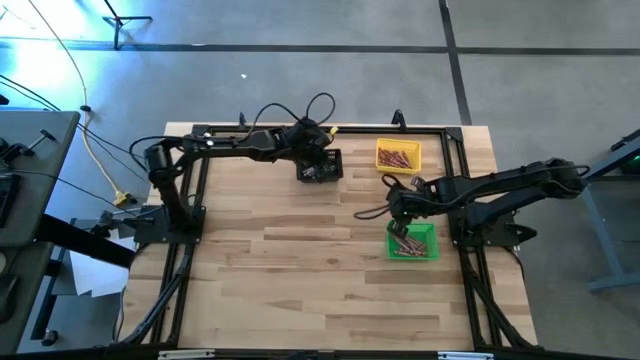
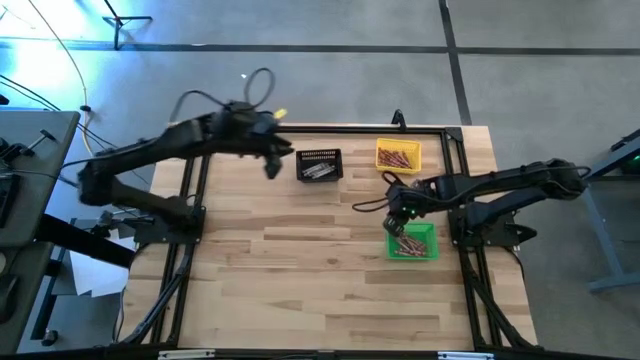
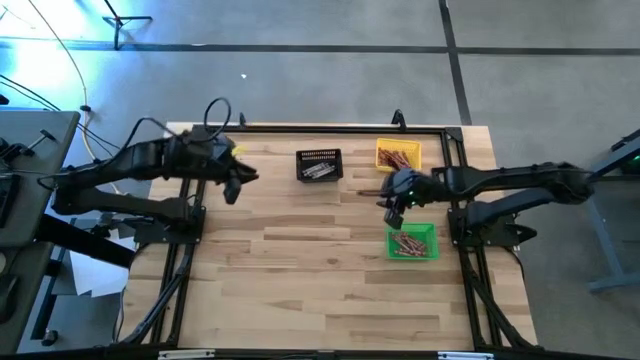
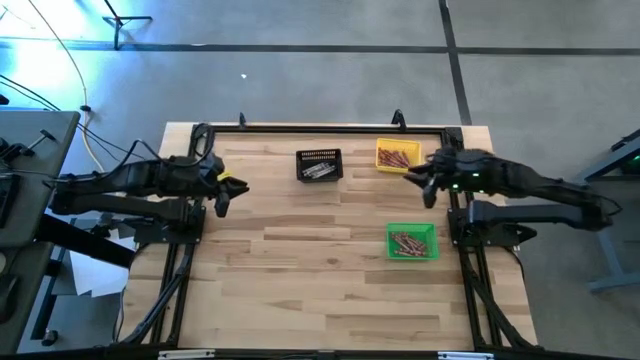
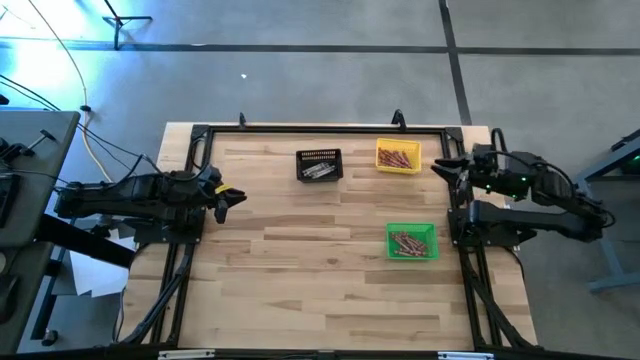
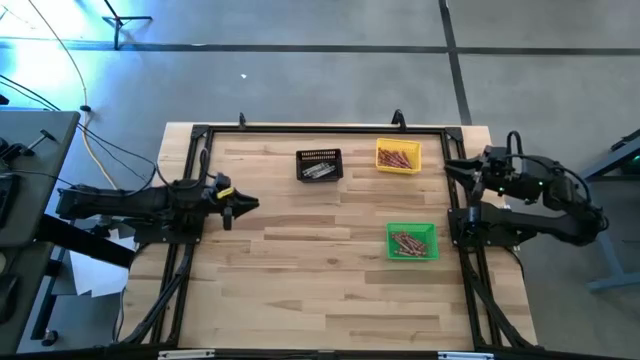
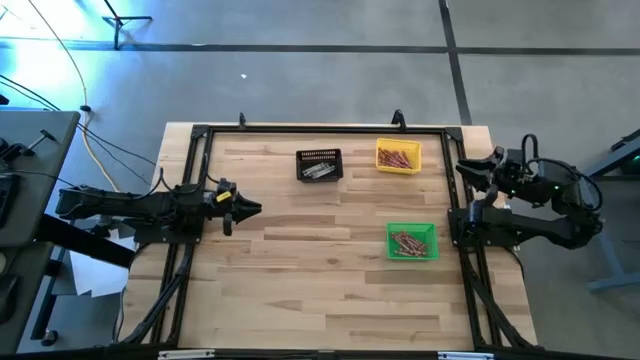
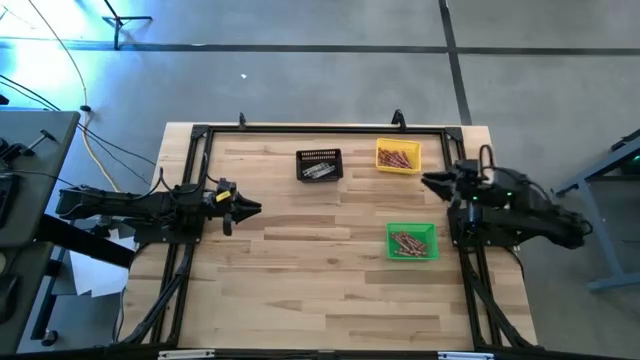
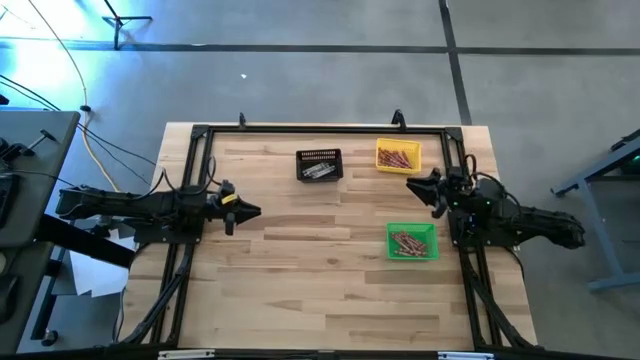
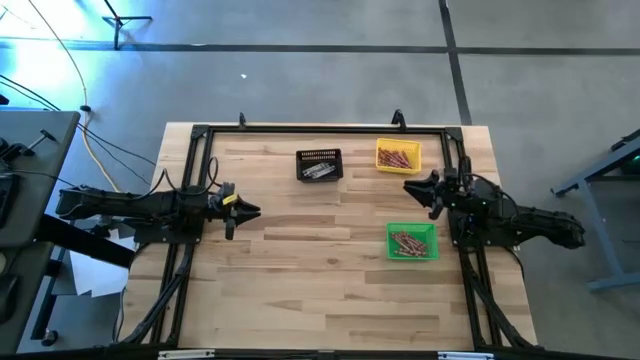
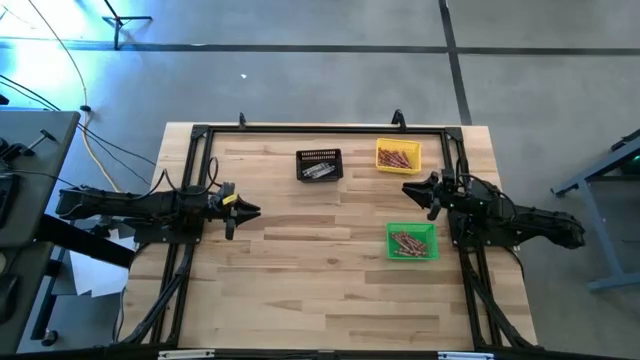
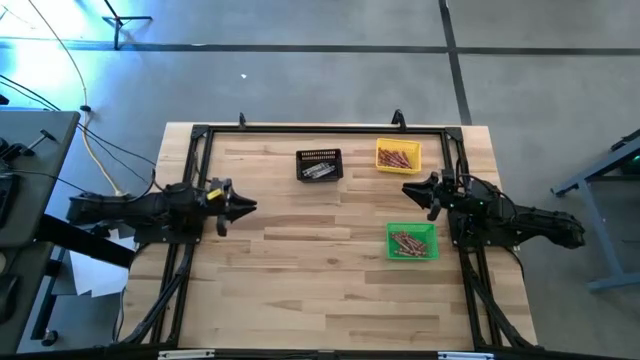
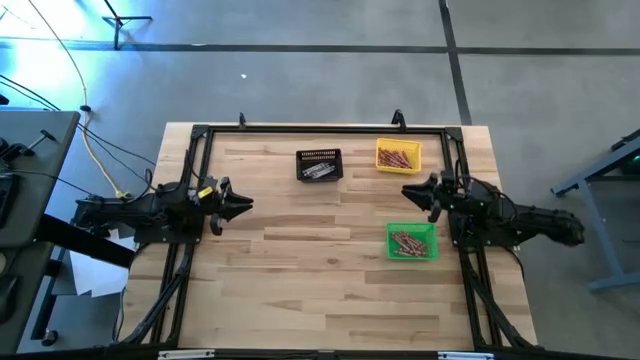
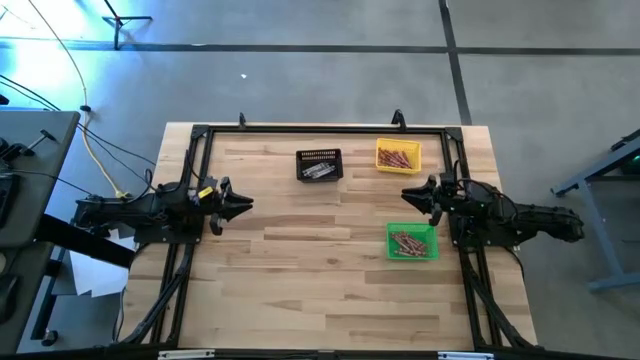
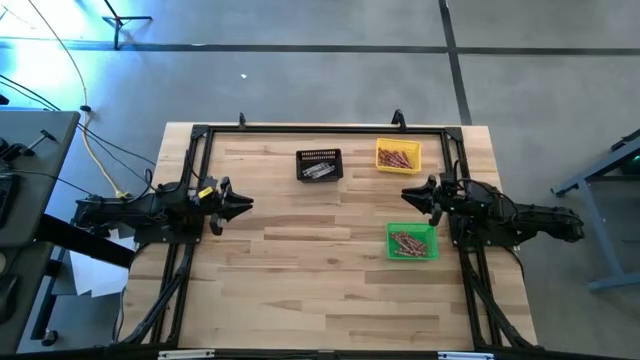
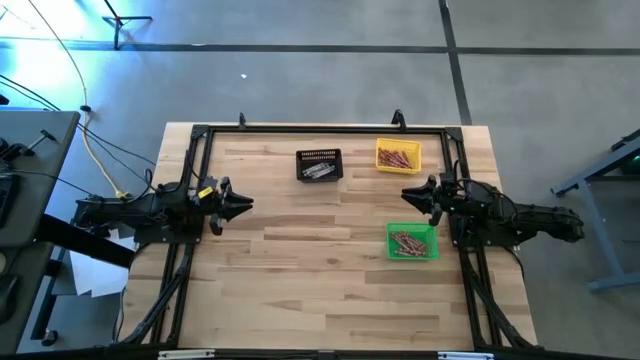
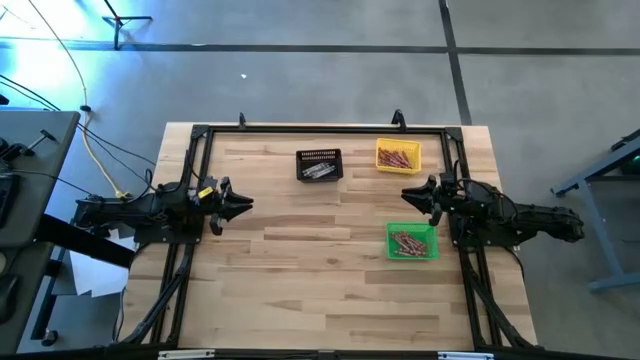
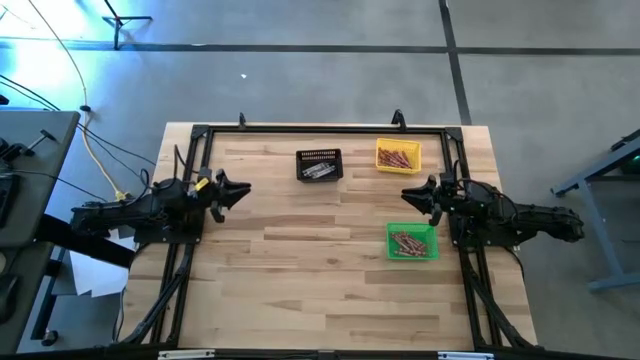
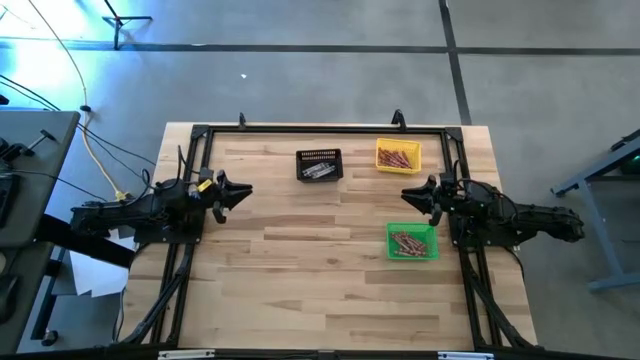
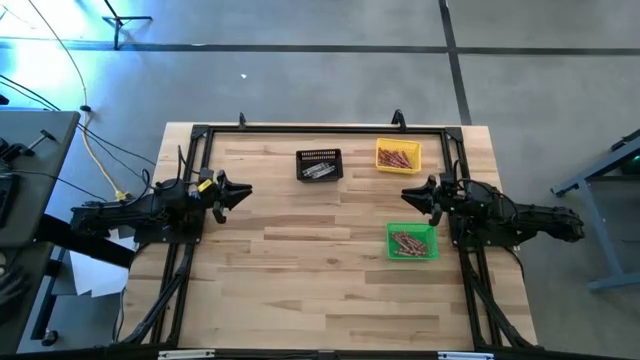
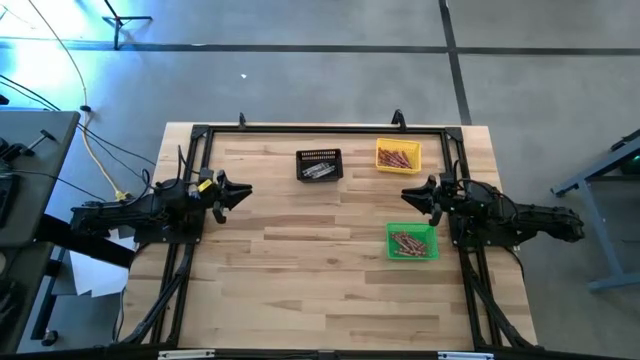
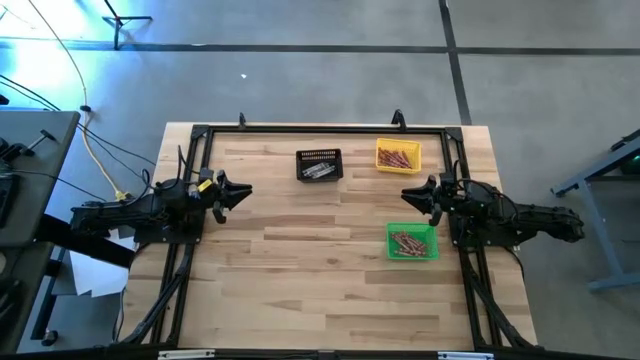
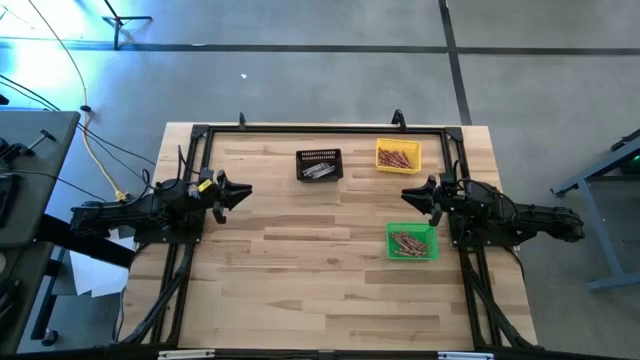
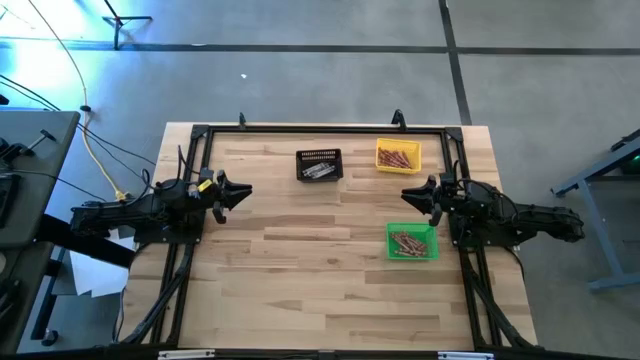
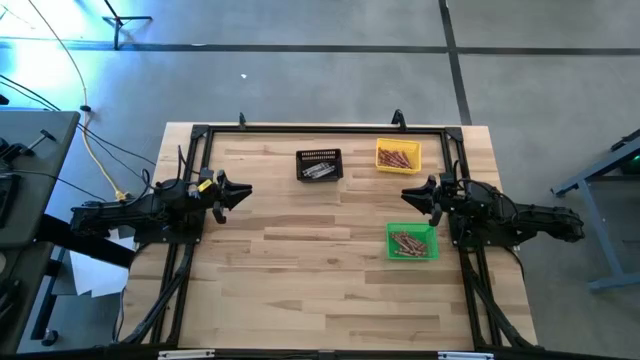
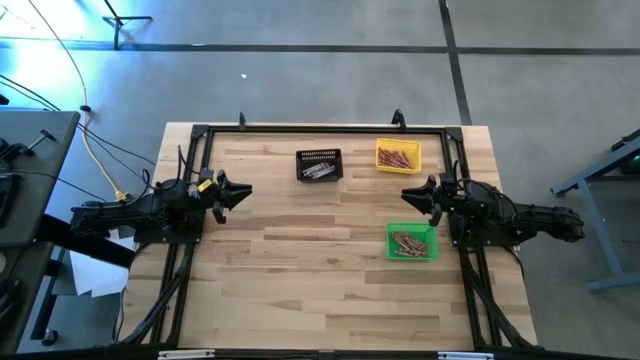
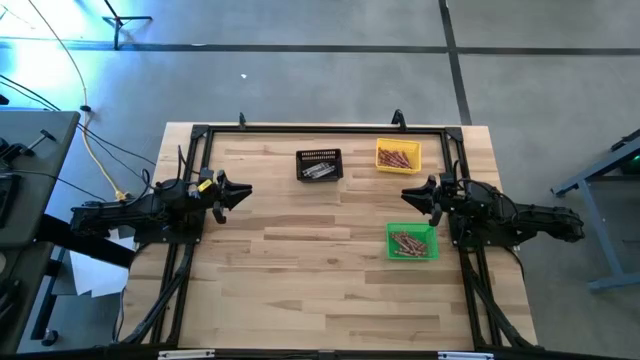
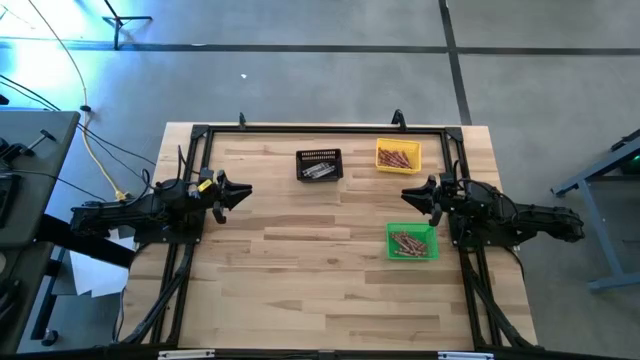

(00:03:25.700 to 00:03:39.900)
Task: Sort crayons
Return to Home Position

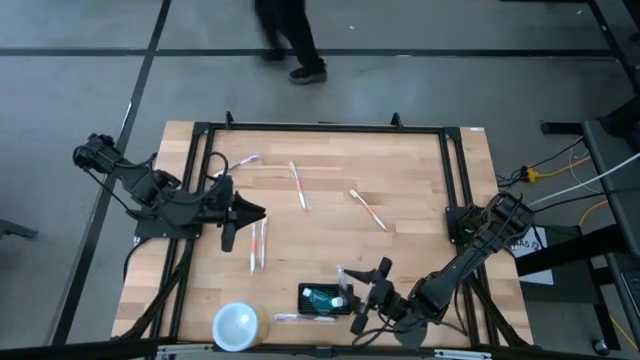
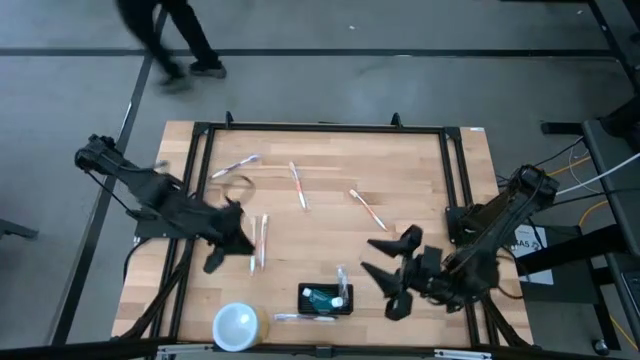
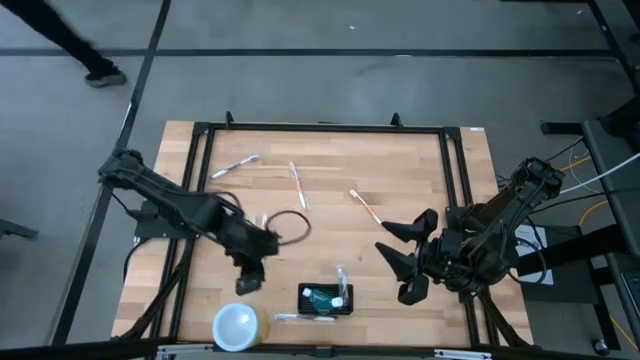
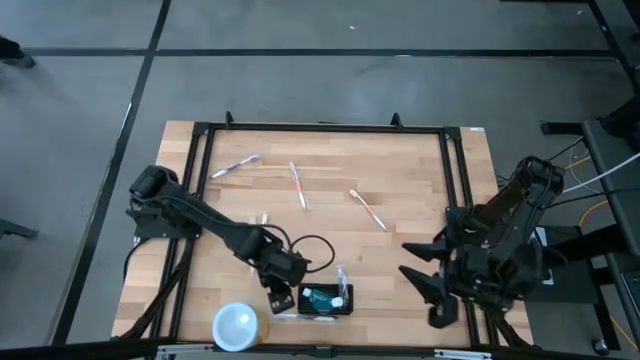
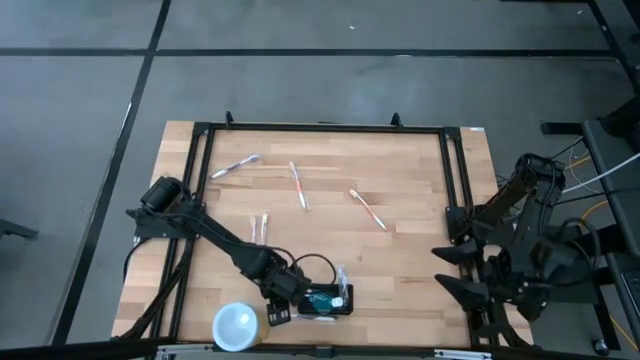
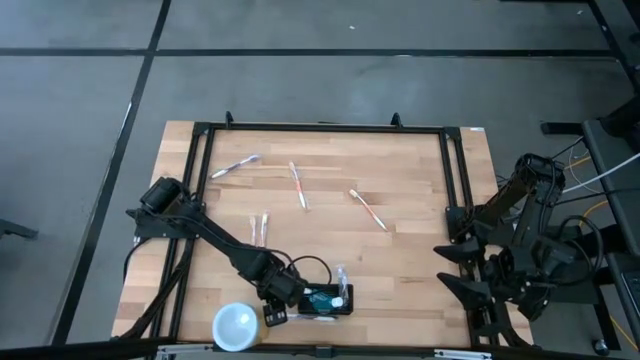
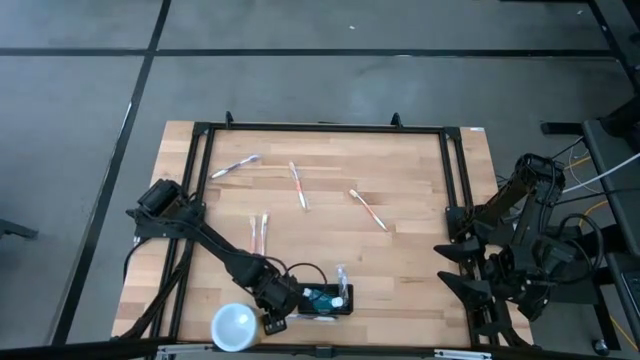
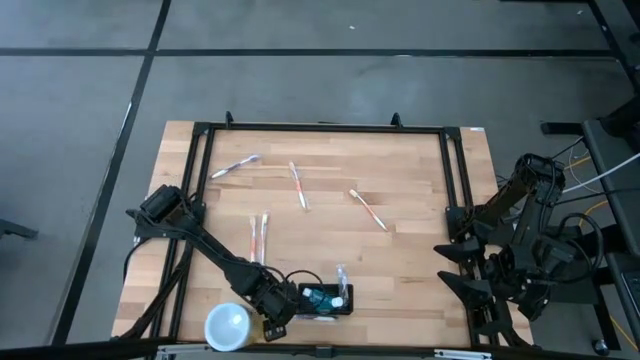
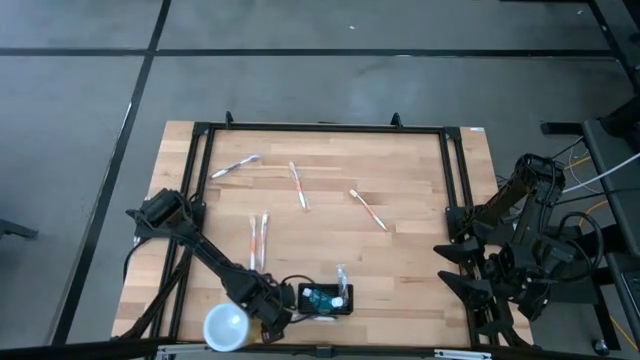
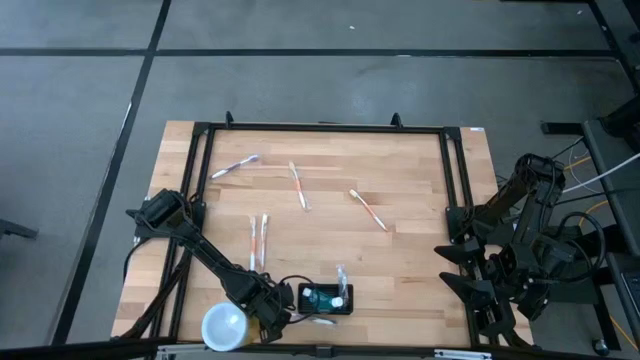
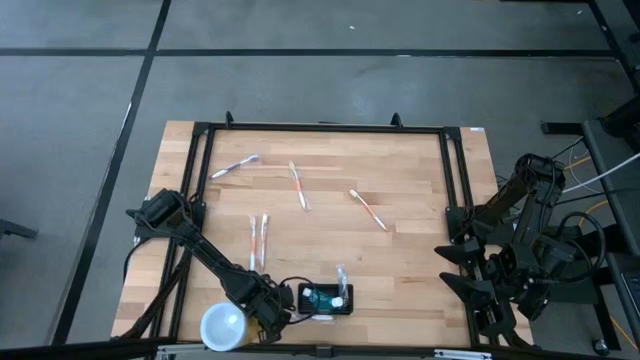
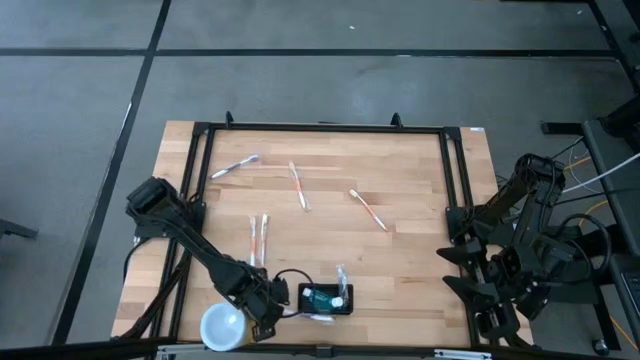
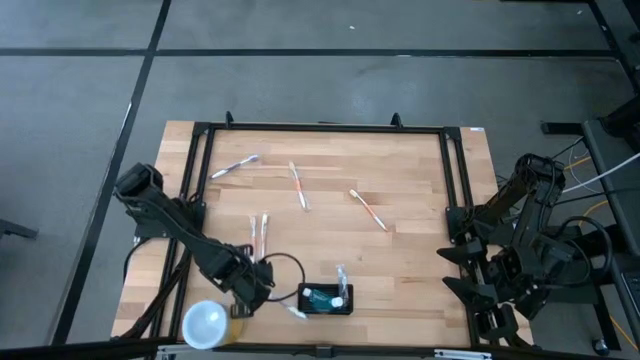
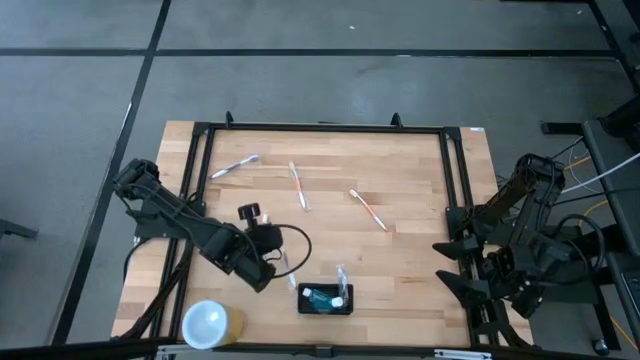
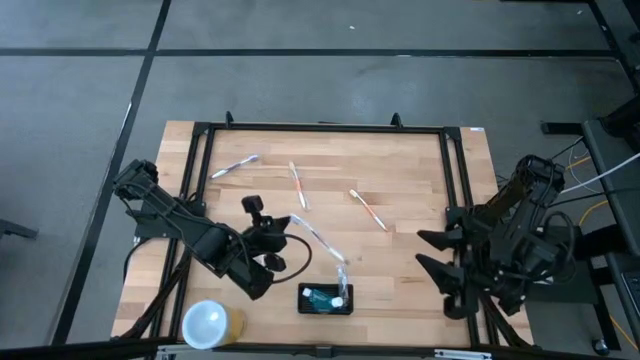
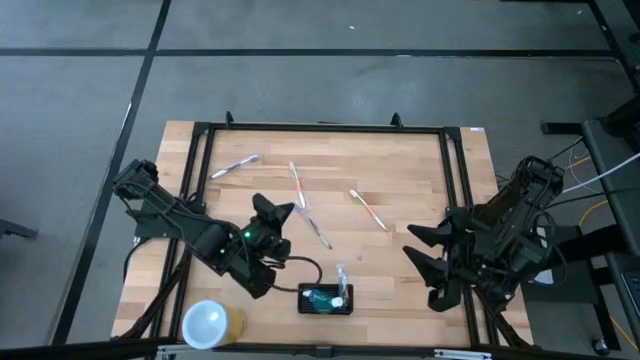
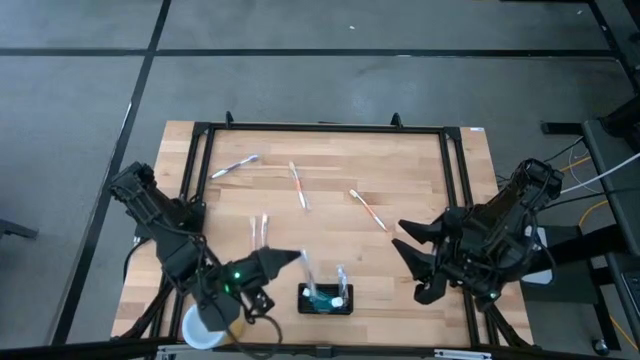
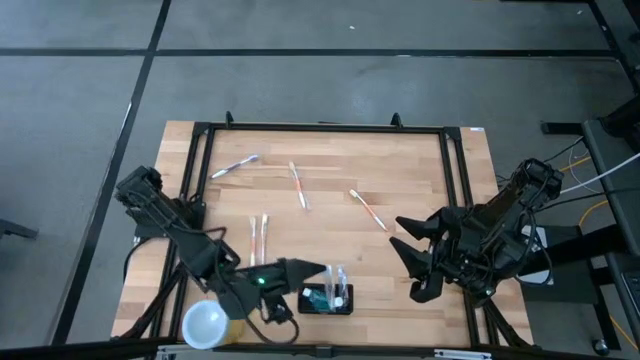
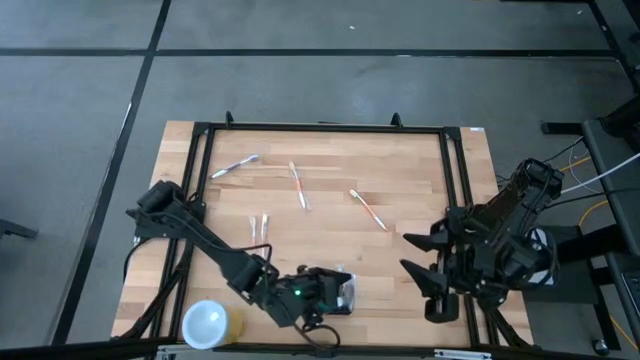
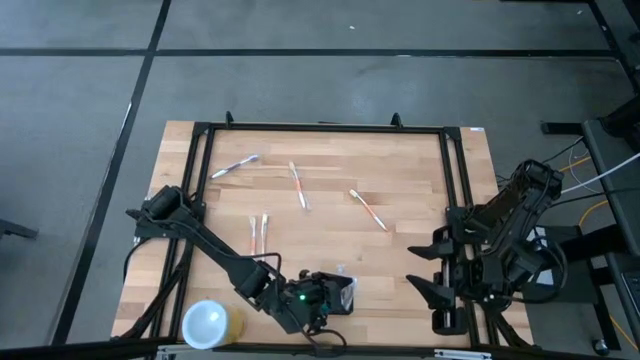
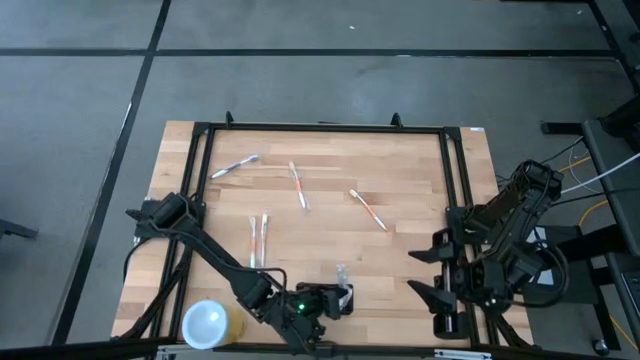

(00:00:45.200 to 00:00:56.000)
Task: Pick & Place toothbrushing station
Put the purple toothbrush into the mesh organizer
